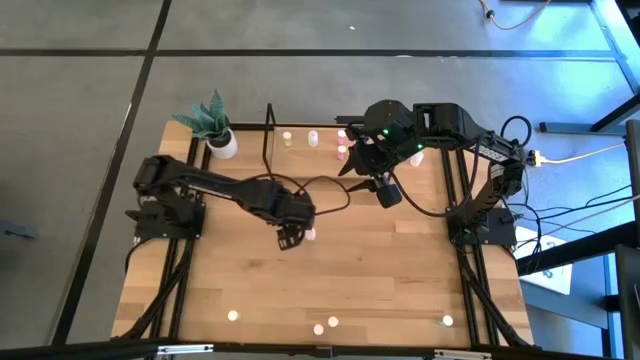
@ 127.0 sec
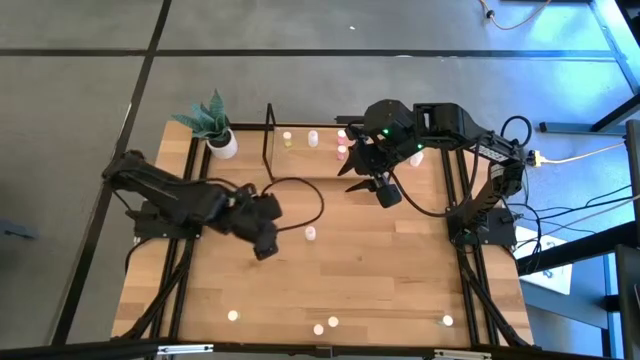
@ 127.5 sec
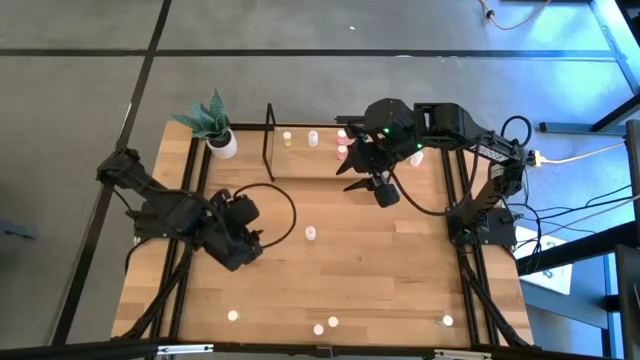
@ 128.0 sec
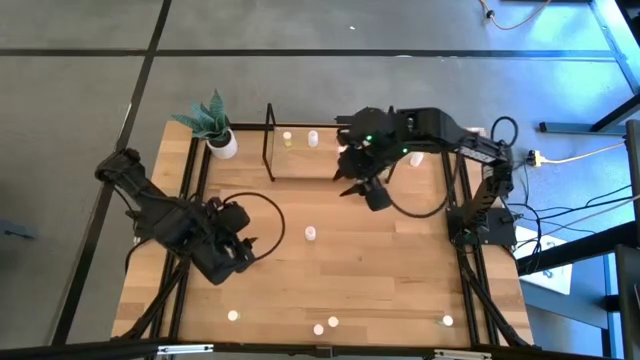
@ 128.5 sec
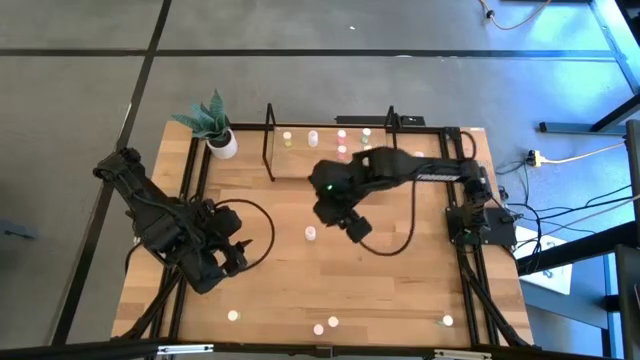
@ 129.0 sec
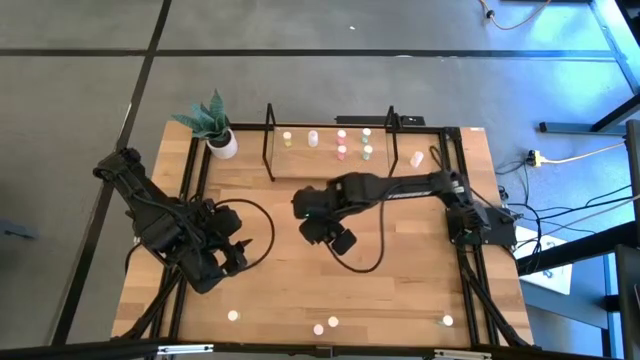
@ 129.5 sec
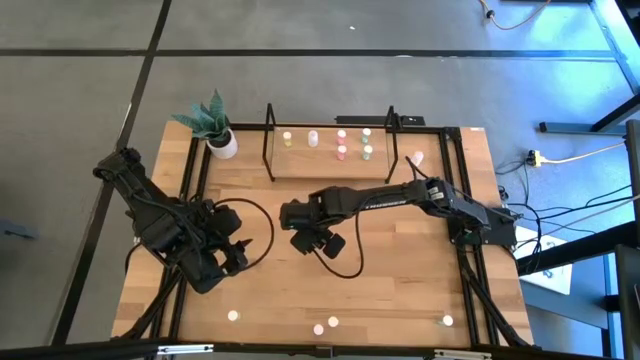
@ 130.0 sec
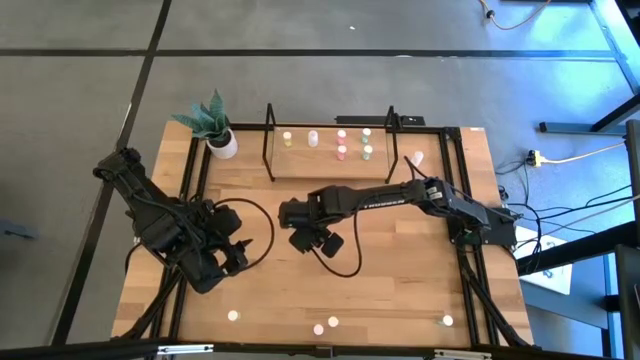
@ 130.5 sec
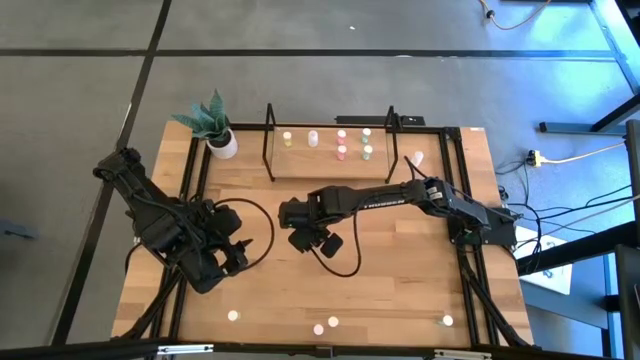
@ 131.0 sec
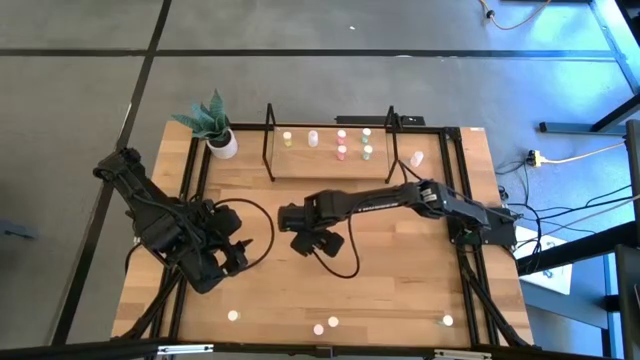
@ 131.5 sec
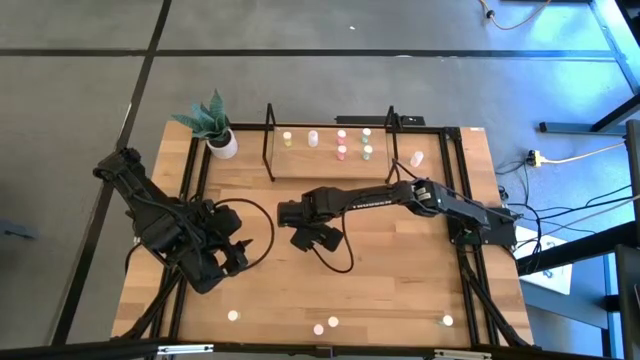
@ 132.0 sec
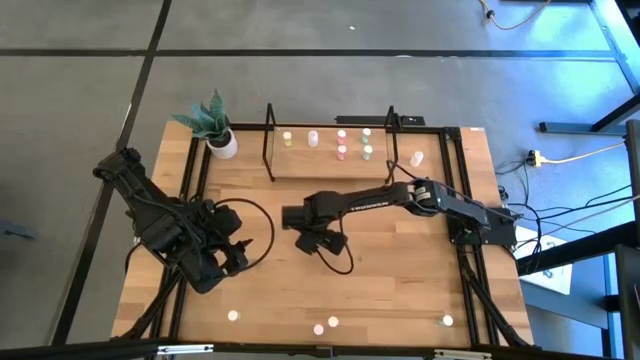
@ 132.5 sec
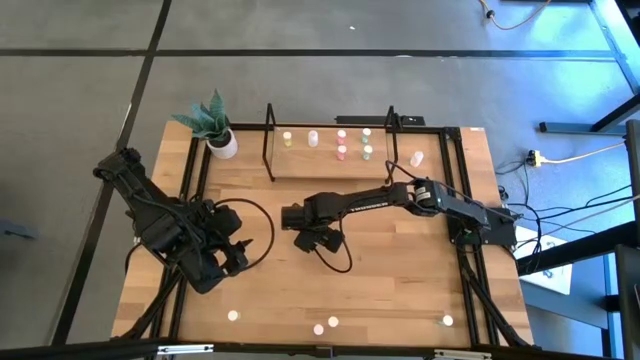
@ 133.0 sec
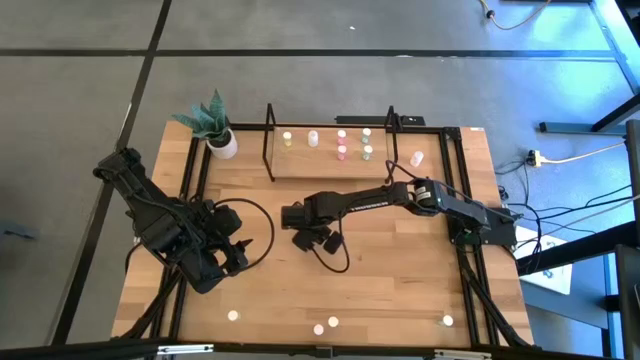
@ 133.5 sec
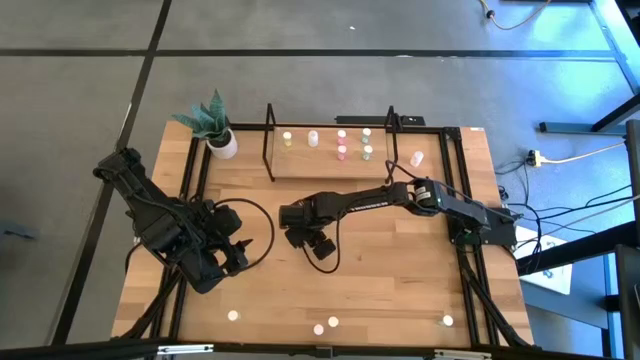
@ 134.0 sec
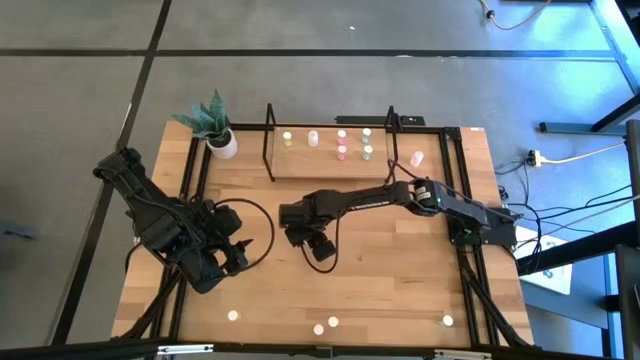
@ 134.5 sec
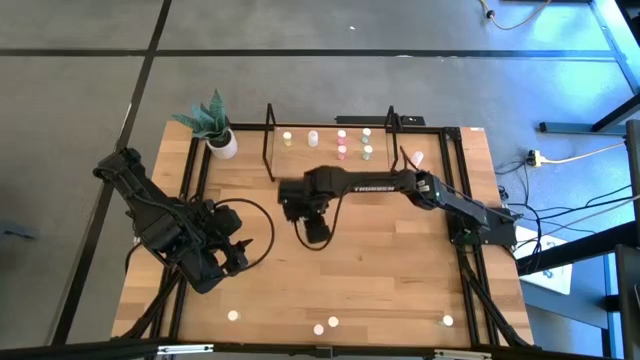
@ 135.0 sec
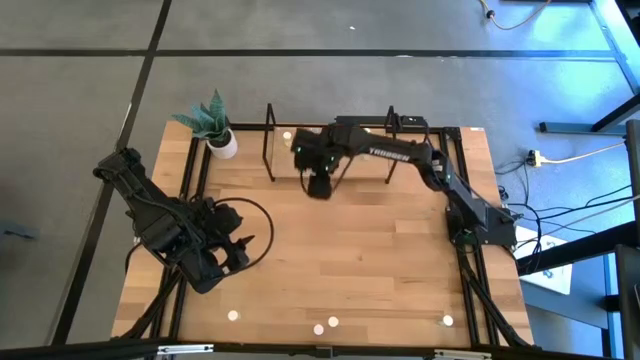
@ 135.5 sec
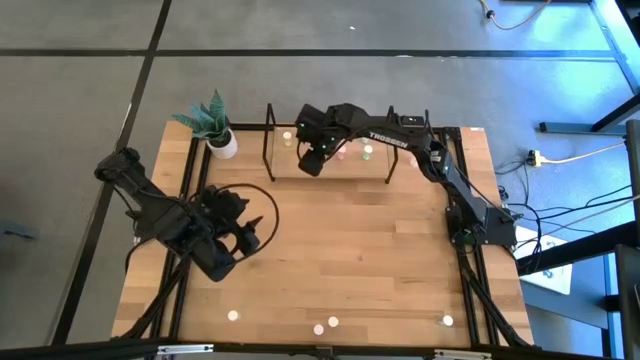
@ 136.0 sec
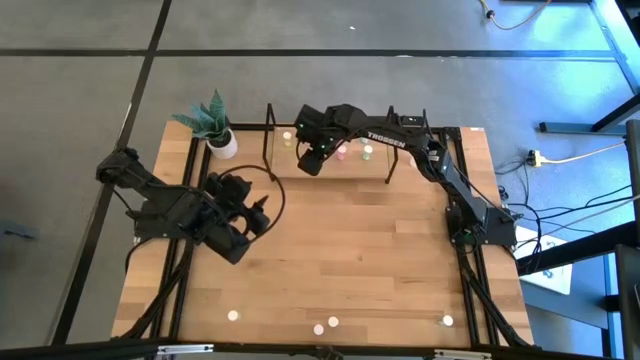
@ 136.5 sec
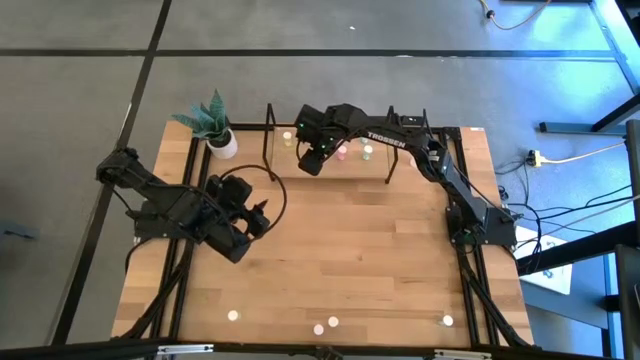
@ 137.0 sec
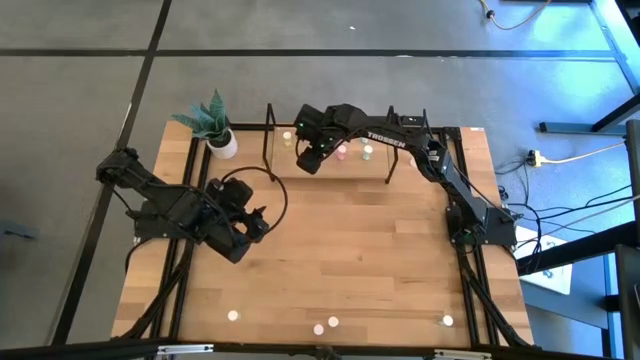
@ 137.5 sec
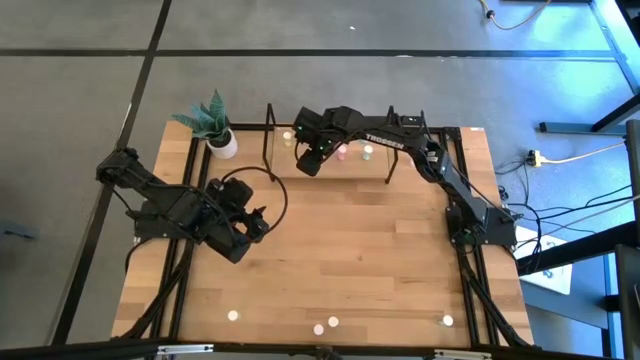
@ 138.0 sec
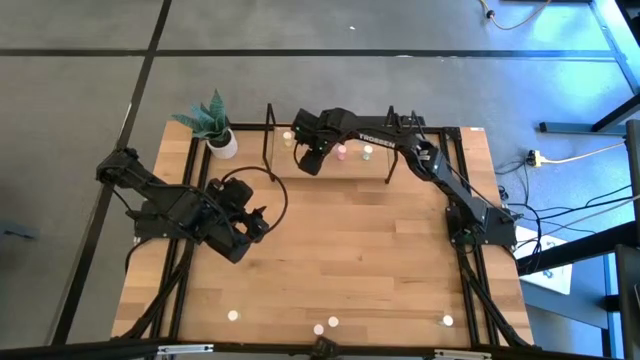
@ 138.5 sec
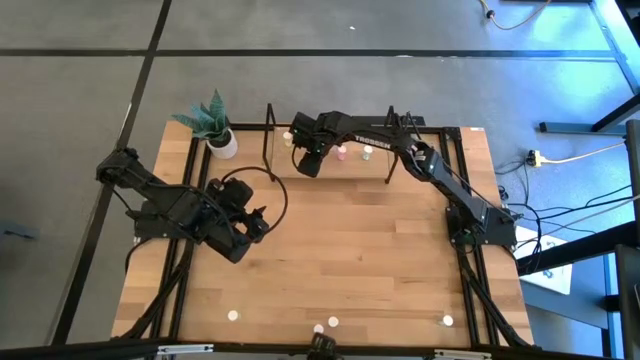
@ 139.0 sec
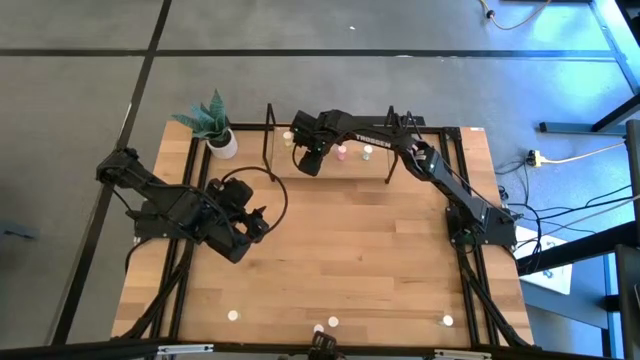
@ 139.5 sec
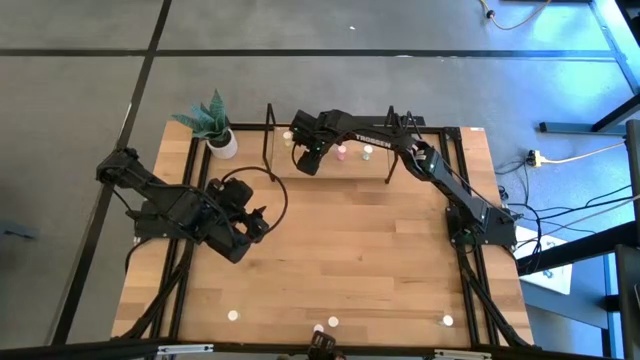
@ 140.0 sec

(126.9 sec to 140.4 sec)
Task: Pick and place medicine bottles onto shelf by color
Put the bottom white pill bottle on the shelf aligned with other white pill bottle

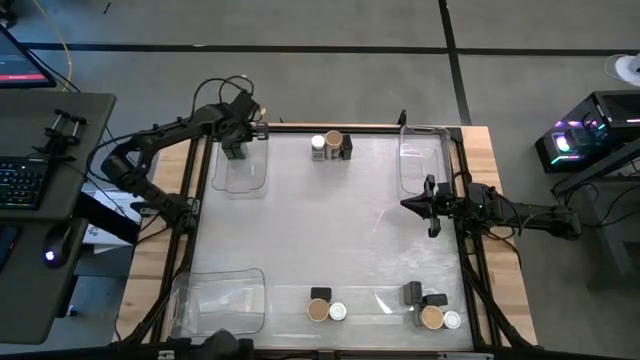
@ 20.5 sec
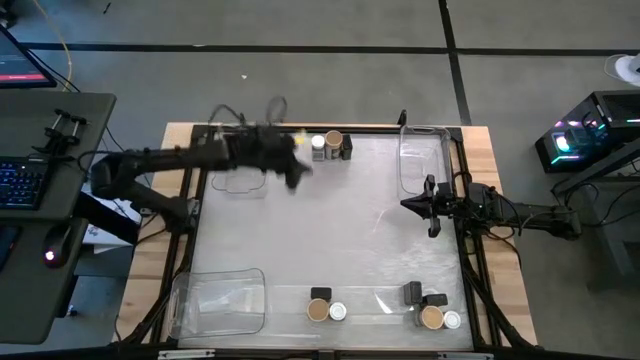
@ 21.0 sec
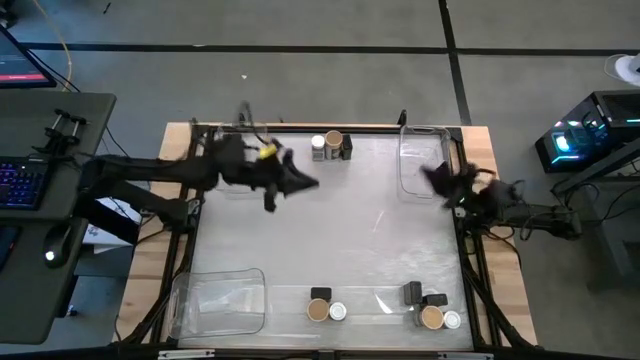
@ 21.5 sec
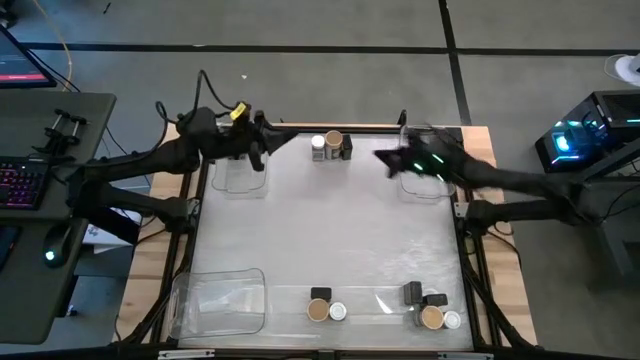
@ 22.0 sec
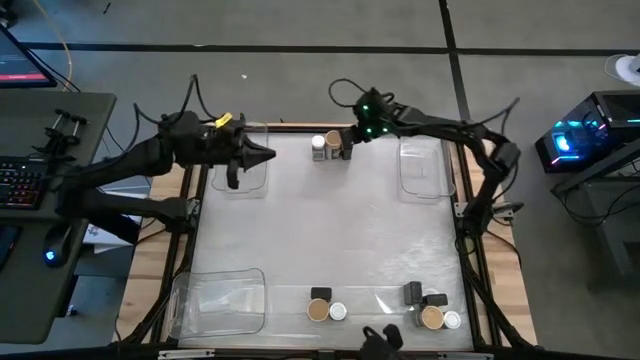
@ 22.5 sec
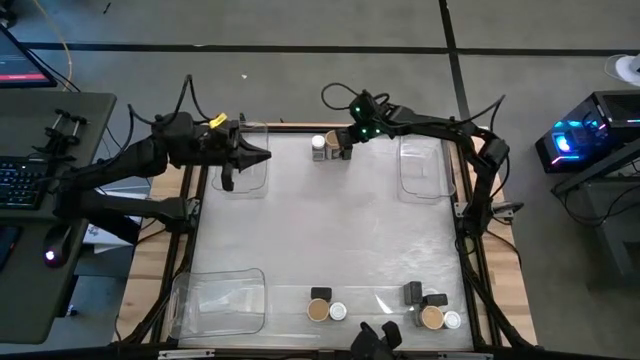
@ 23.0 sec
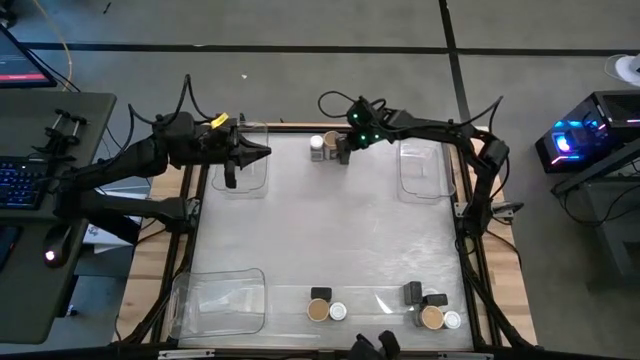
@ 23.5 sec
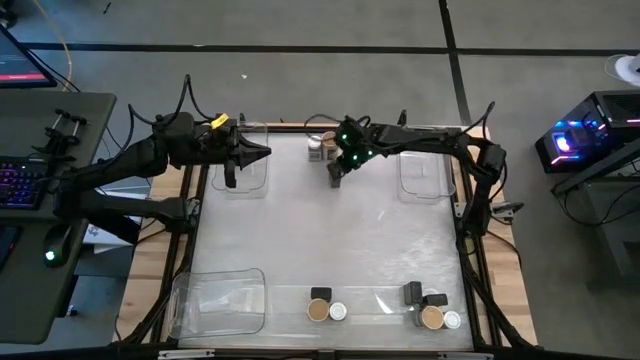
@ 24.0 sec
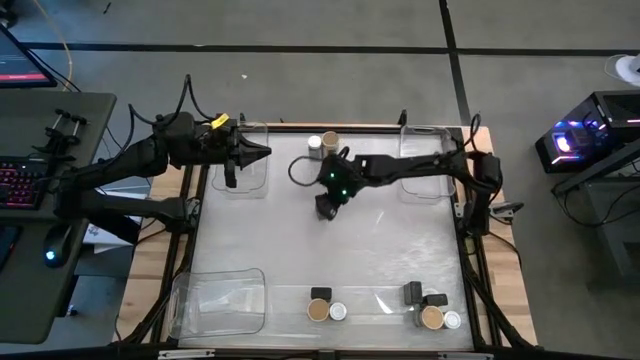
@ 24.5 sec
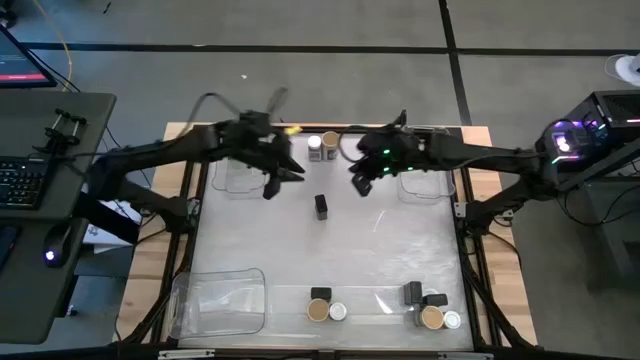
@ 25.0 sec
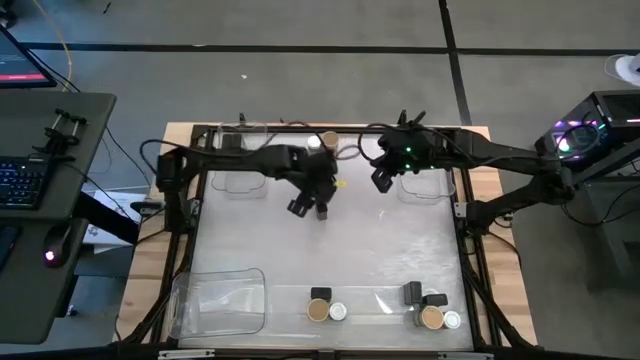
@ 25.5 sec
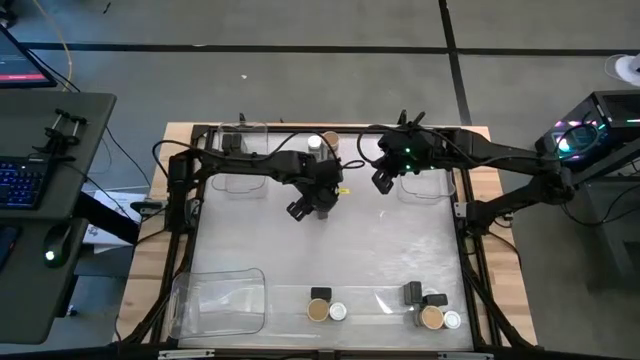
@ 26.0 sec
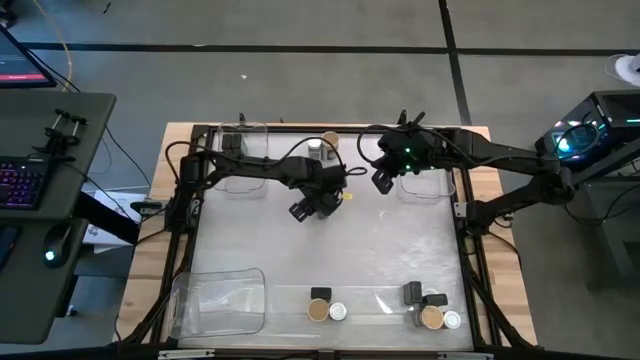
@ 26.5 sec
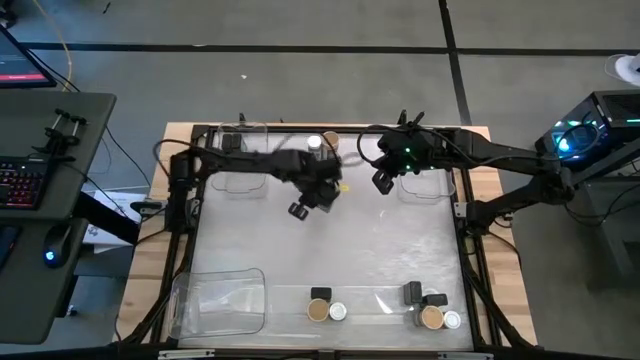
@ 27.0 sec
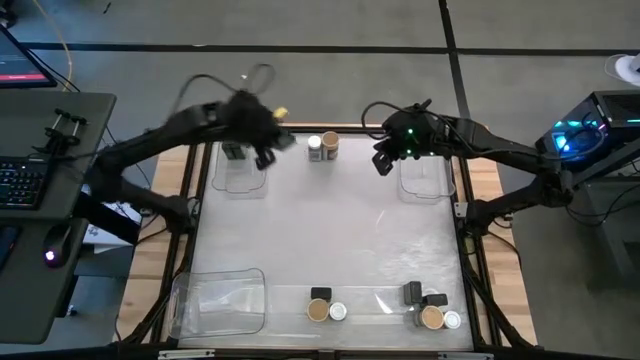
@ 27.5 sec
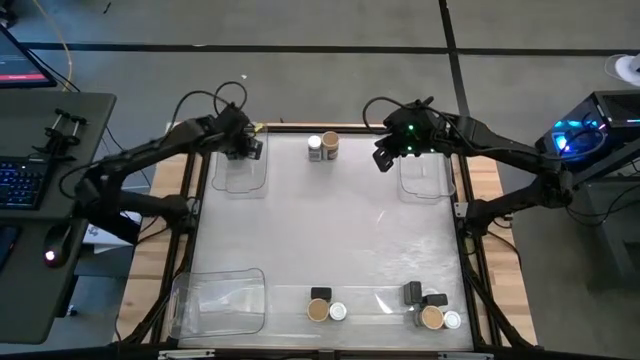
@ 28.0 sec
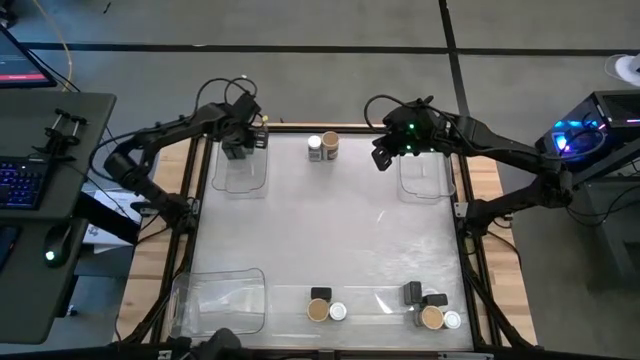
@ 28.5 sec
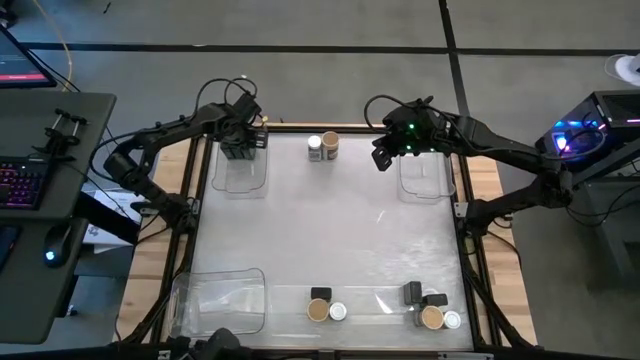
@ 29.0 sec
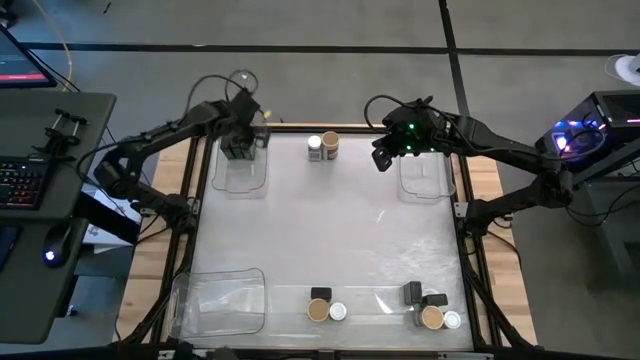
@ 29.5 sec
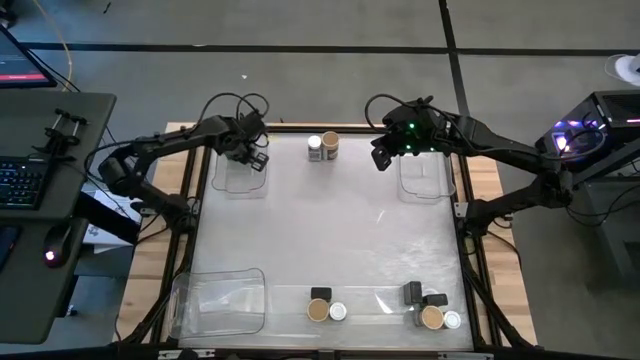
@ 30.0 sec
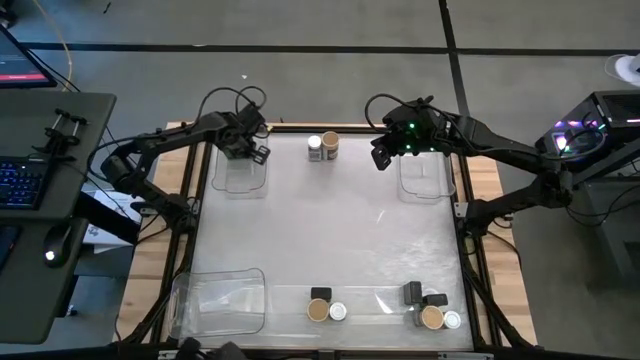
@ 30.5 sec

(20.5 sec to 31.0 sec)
Task: Sort spices by type
Put the black seasoning can into the top left transparent bin
